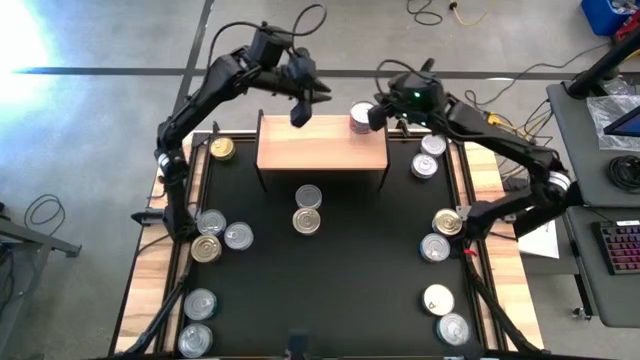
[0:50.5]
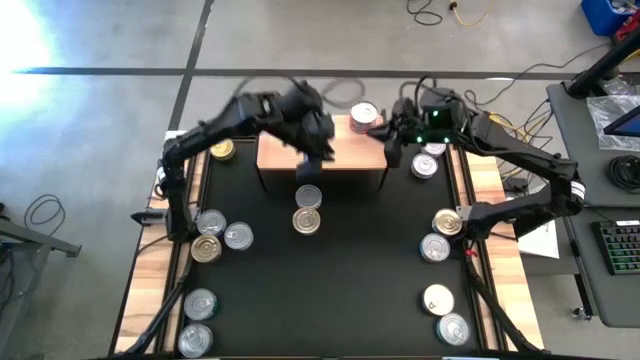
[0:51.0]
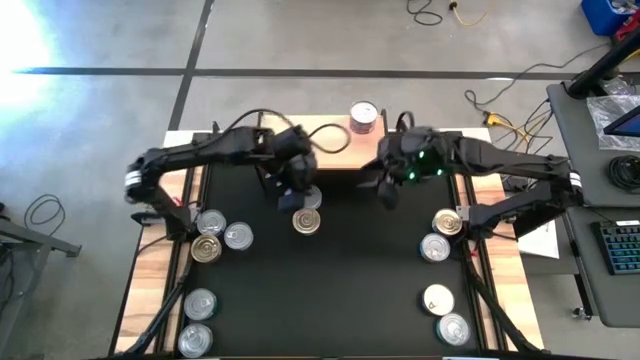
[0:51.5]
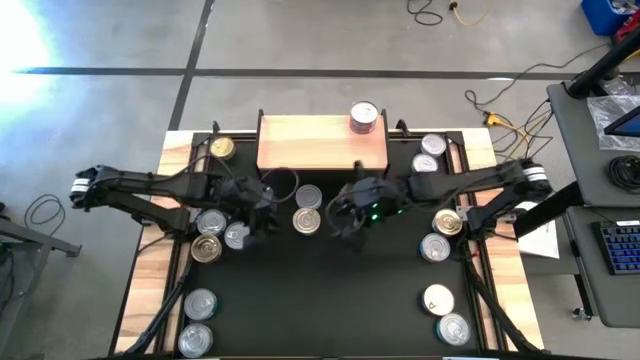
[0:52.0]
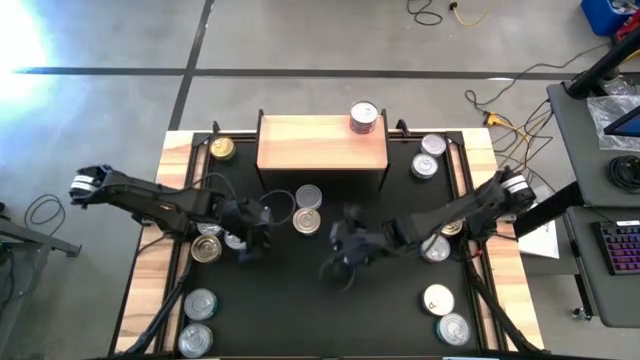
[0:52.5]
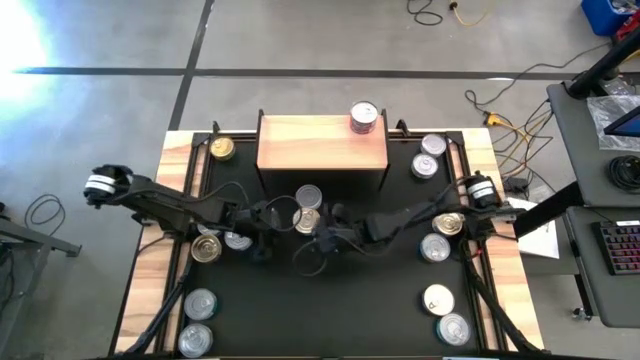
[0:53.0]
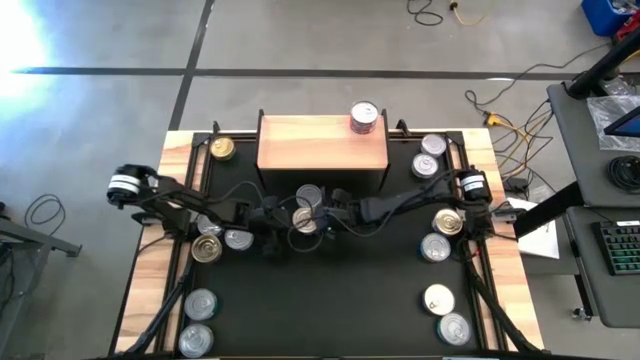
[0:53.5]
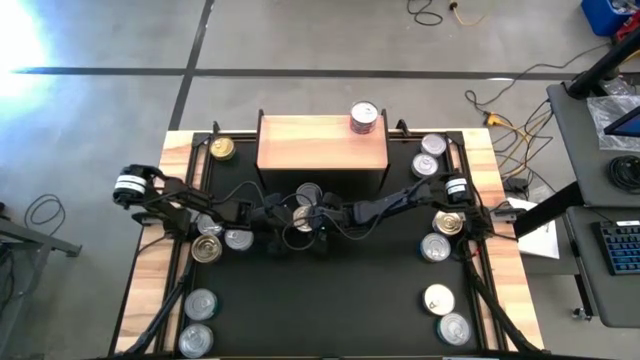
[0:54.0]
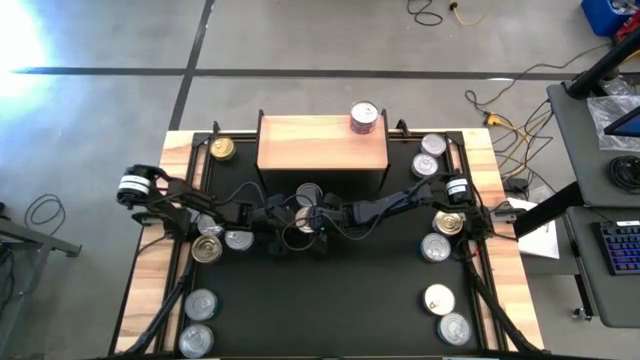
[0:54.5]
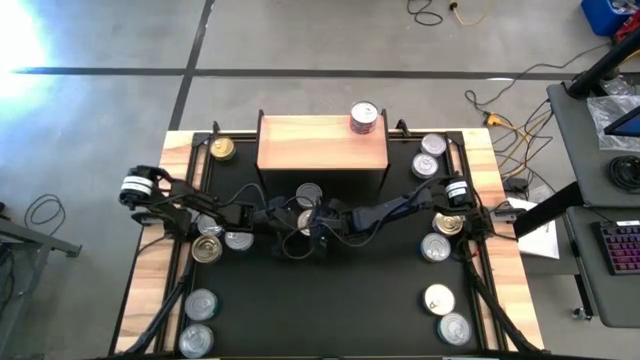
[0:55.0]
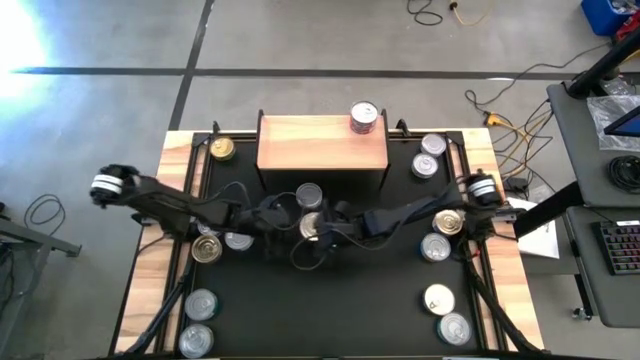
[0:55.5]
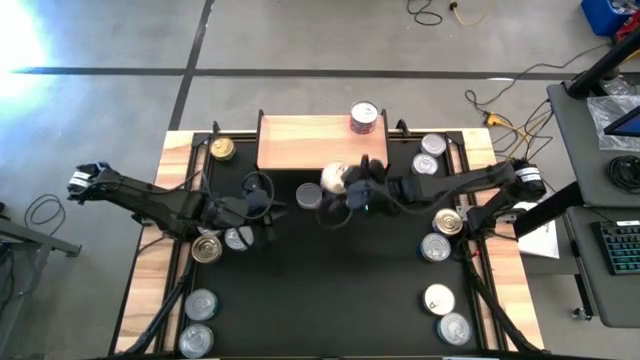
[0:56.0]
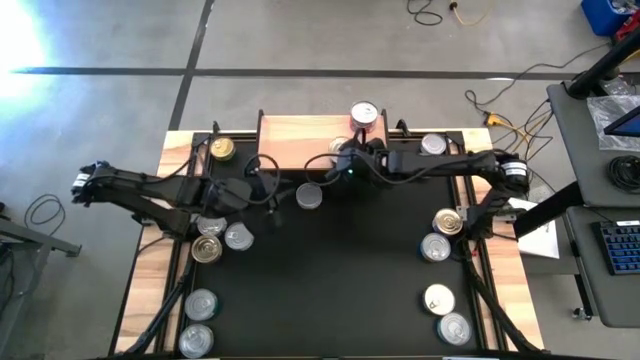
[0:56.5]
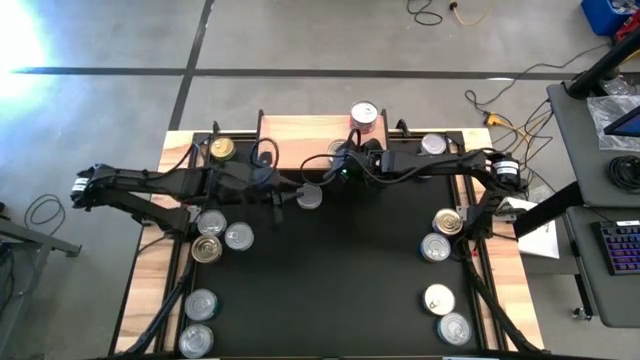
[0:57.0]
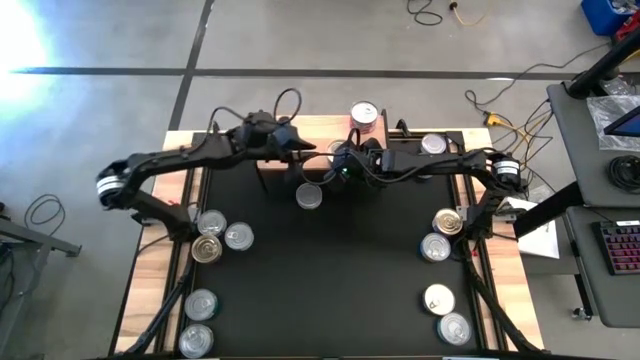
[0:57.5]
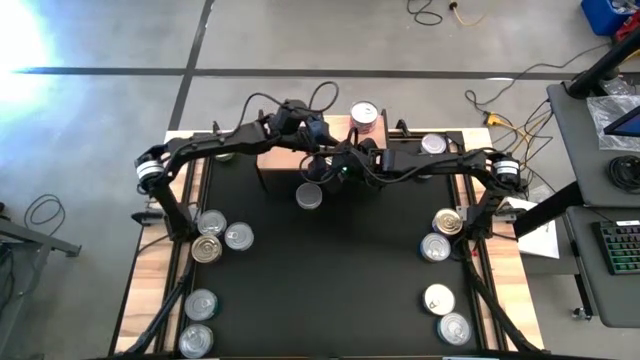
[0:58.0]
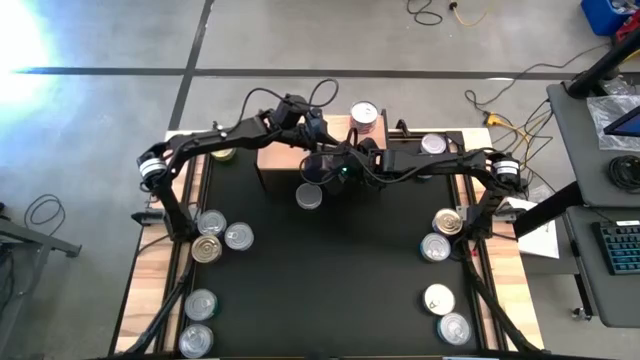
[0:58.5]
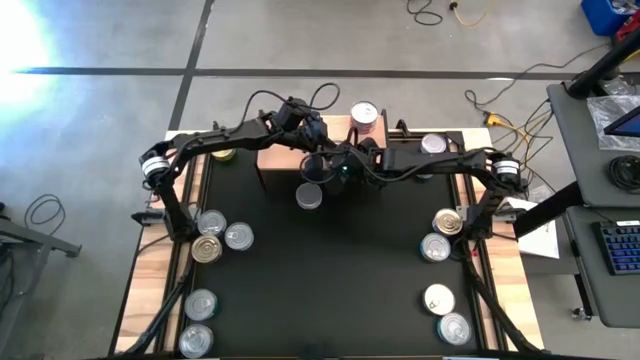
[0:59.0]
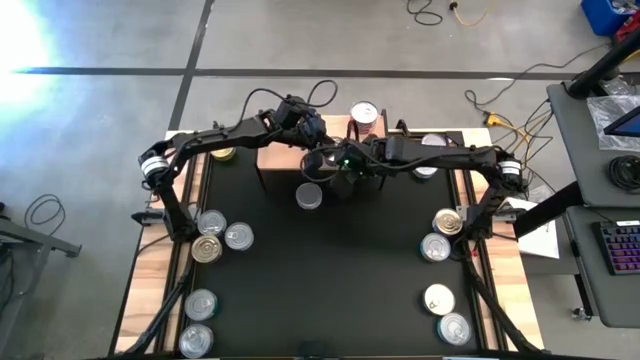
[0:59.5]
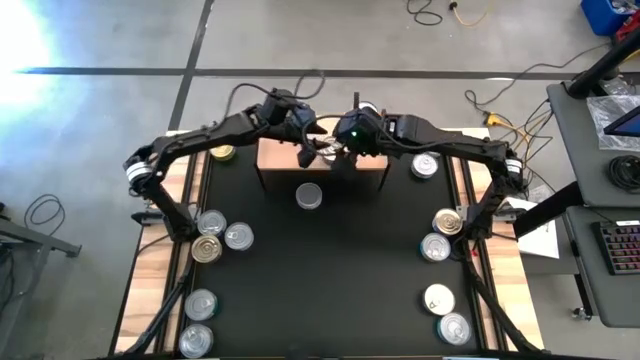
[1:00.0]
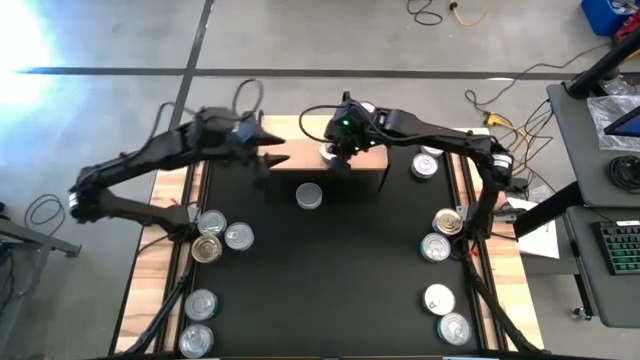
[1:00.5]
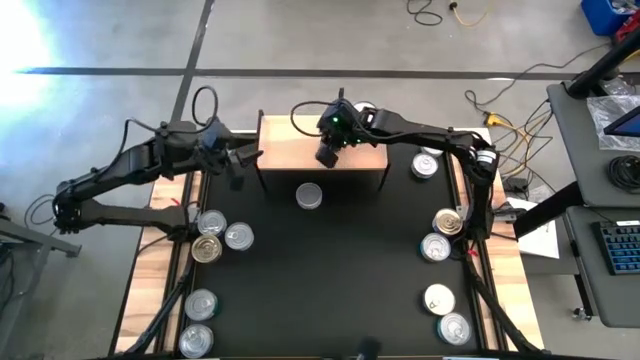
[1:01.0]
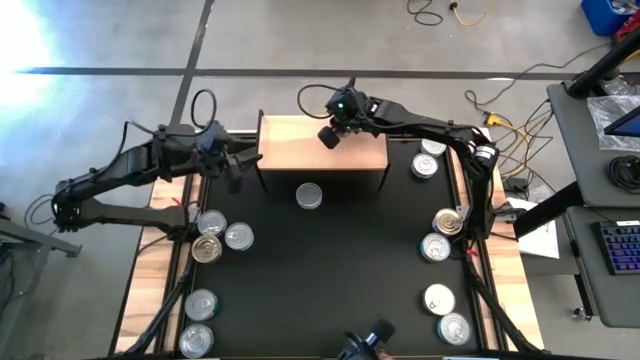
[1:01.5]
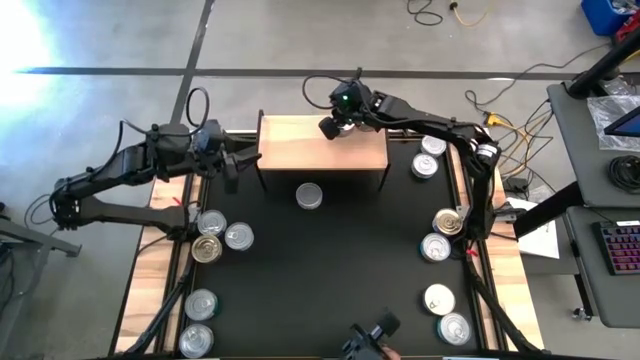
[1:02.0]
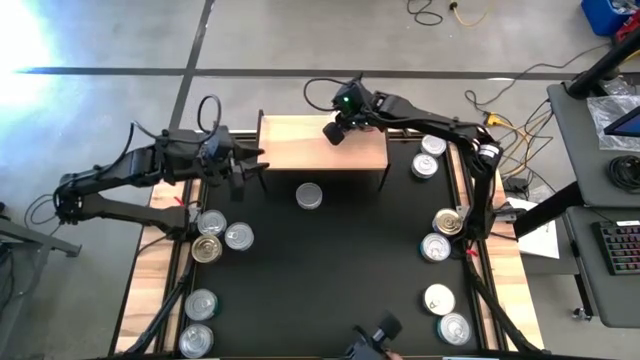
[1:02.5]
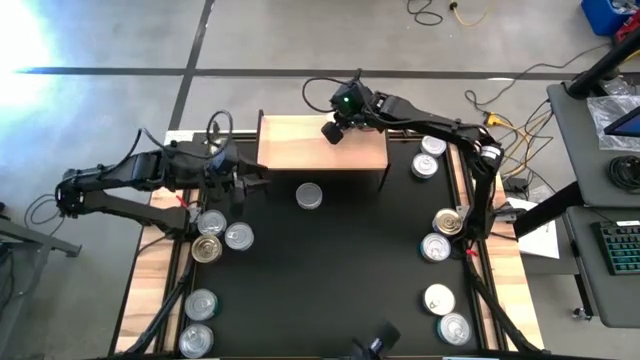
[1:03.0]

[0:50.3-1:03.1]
Task: Stack canned seafood by type on shelf
Put the blue-pink tuna can on the shelf

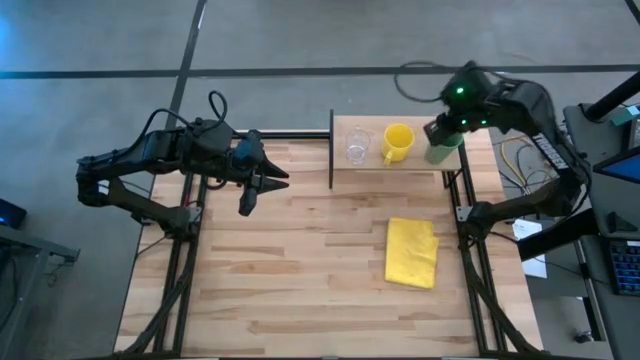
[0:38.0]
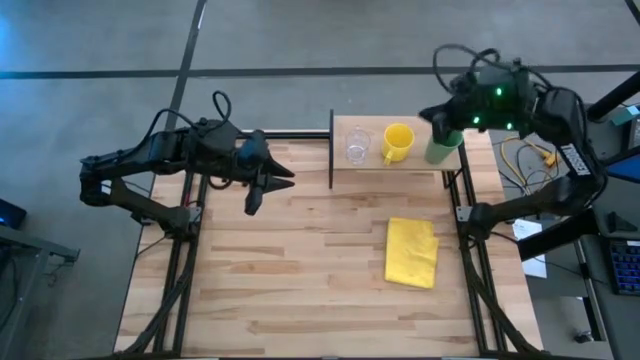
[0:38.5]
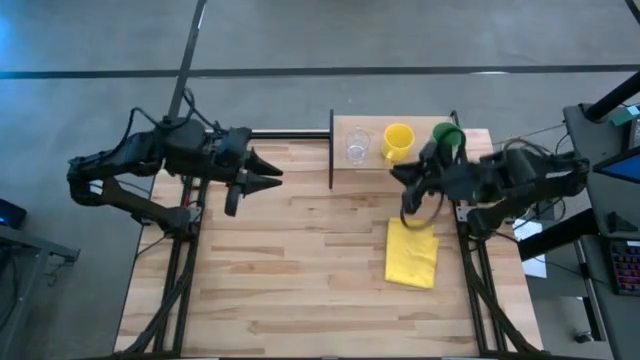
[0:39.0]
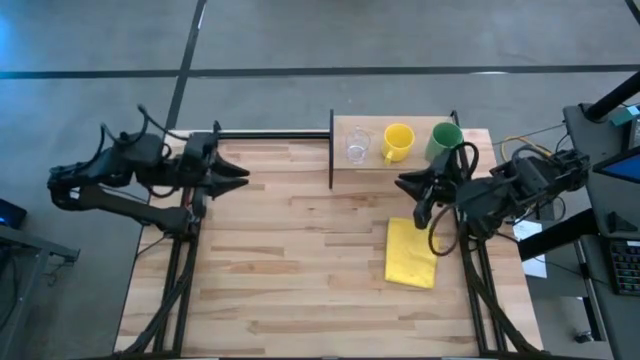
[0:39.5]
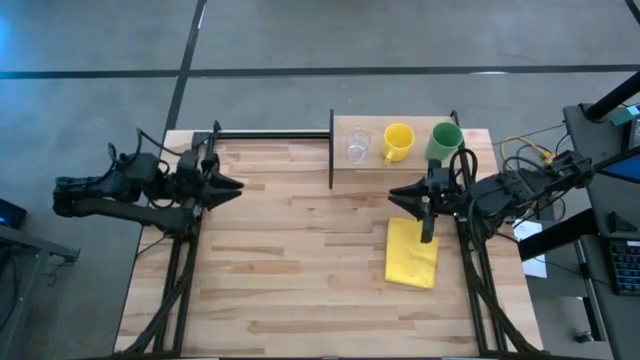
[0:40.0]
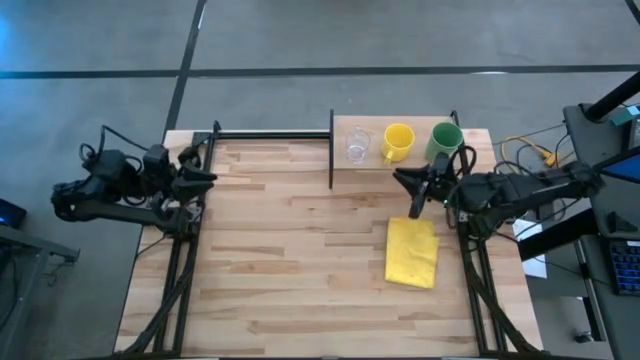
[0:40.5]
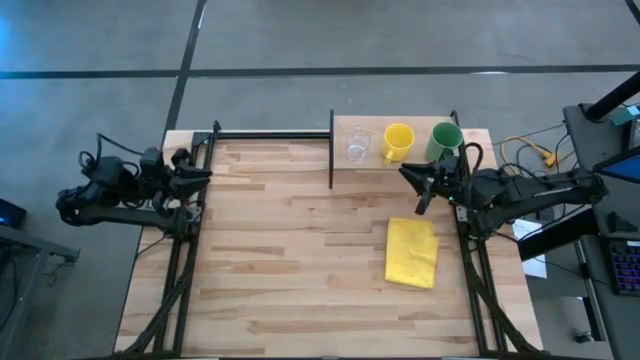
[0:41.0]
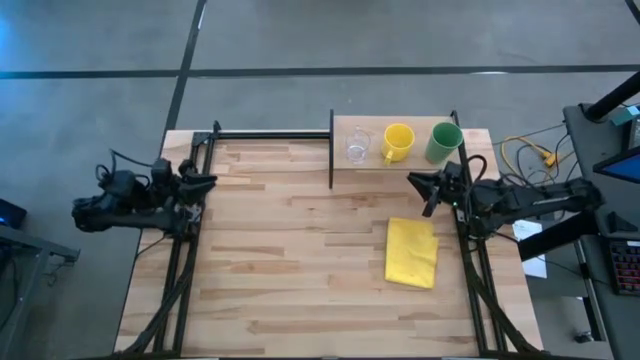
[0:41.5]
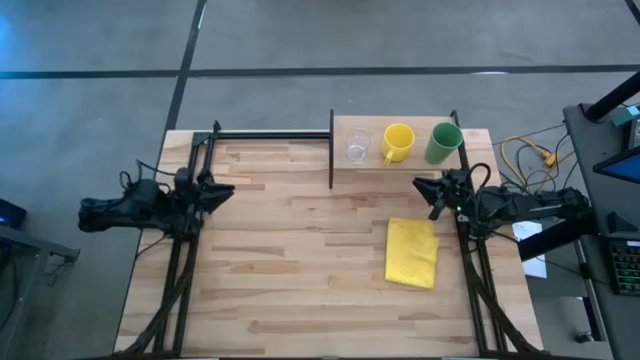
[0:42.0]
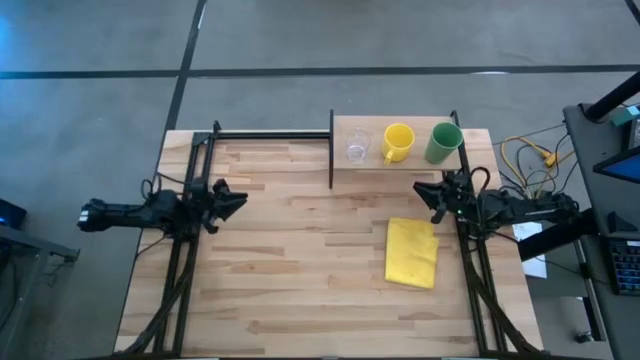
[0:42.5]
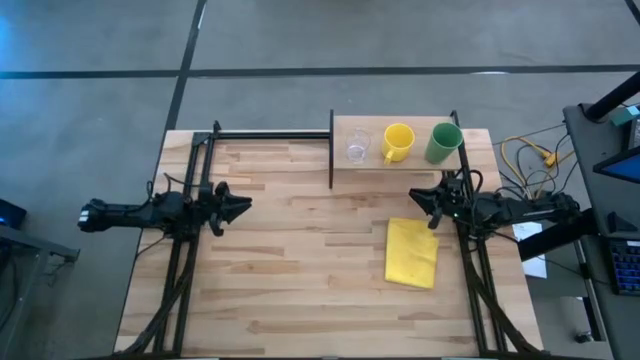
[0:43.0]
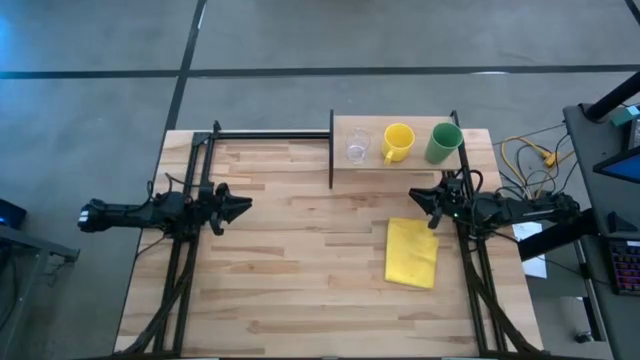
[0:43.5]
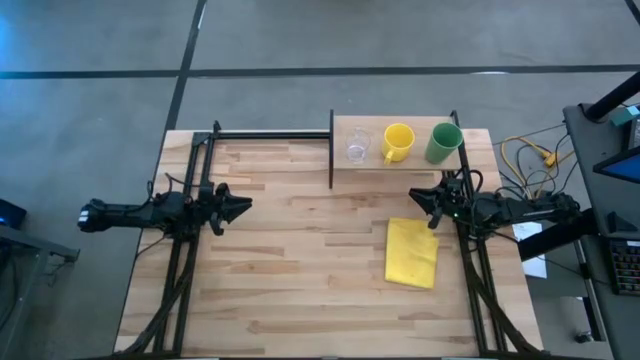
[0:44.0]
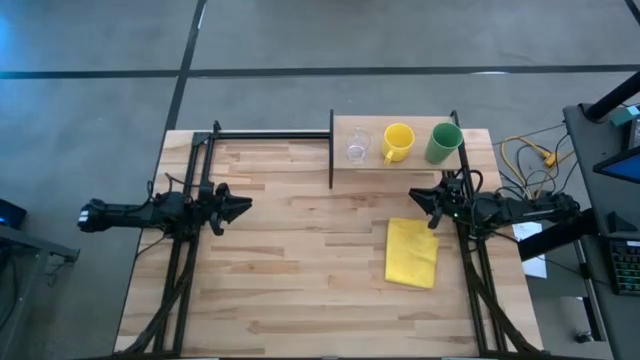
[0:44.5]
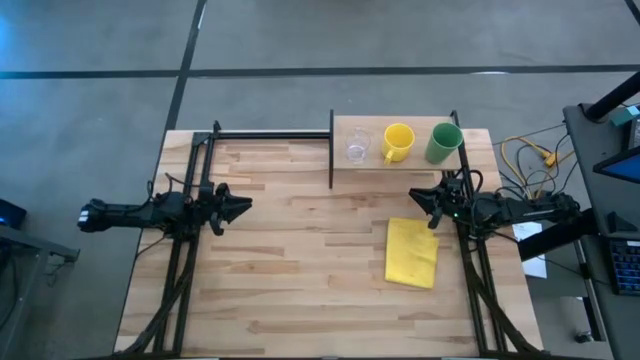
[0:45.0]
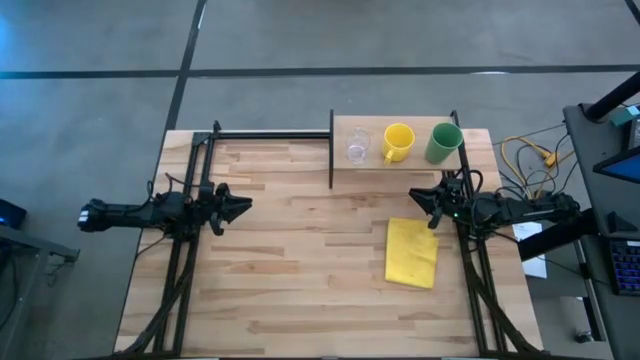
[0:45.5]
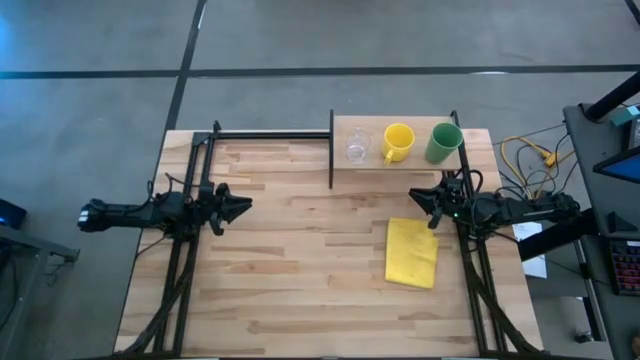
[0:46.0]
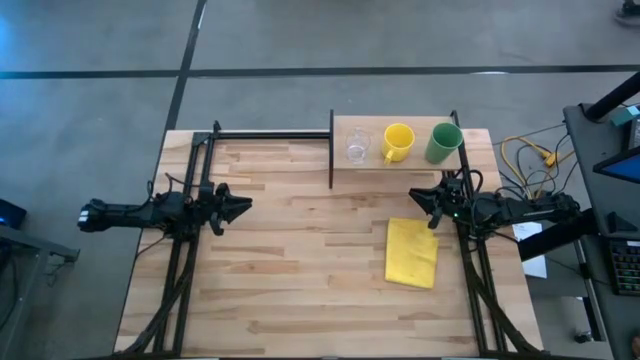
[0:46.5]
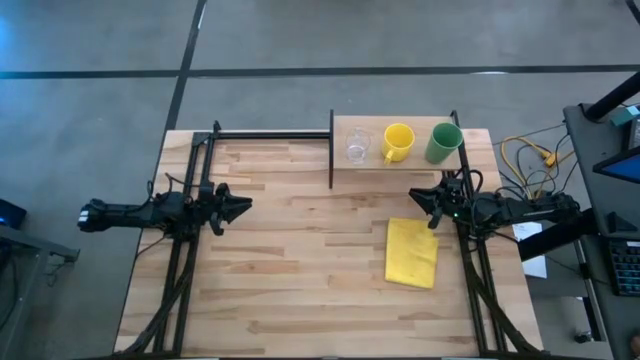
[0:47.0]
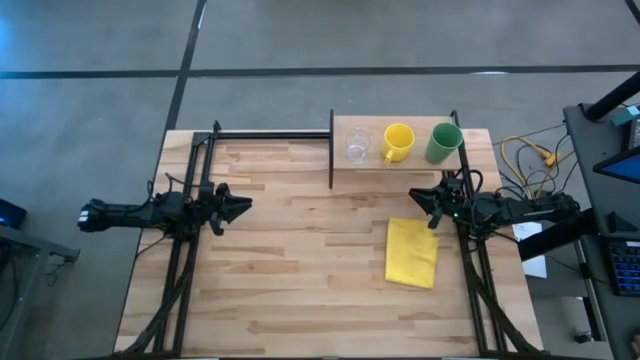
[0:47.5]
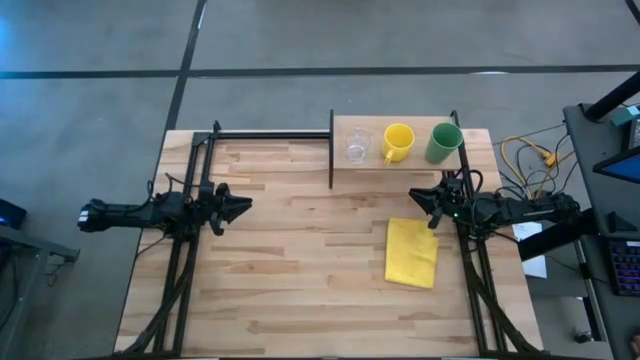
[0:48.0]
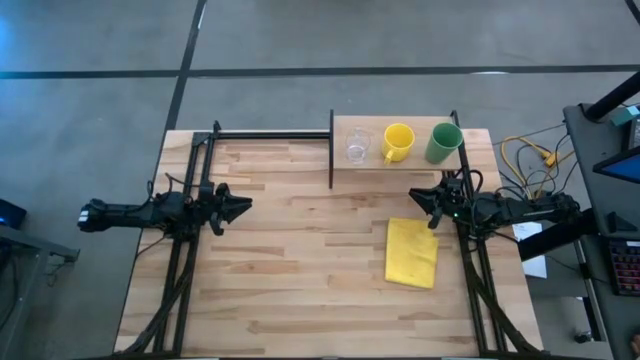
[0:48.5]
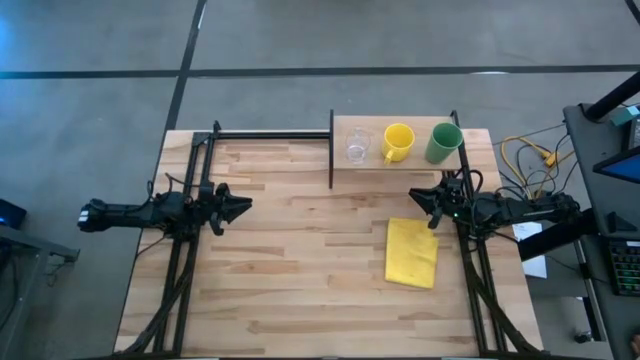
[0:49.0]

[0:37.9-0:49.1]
Task: Stack small to large cups/mugs on shelf
Return to Home Position
